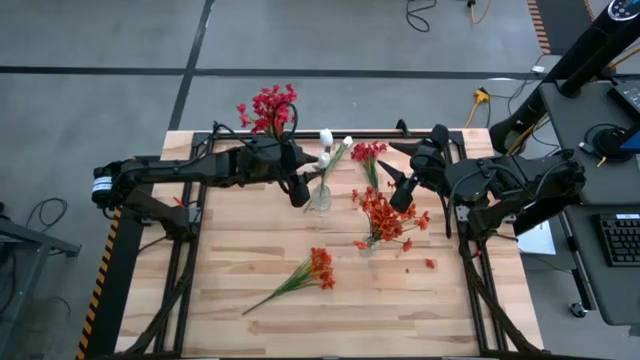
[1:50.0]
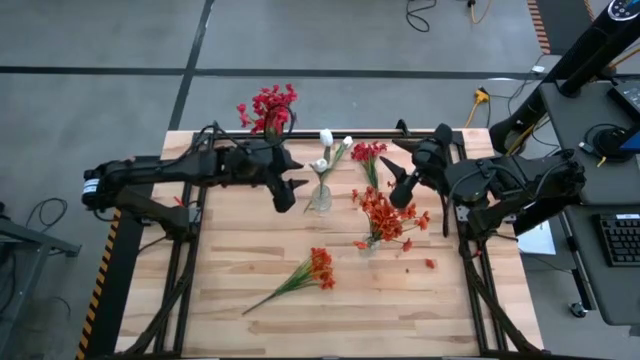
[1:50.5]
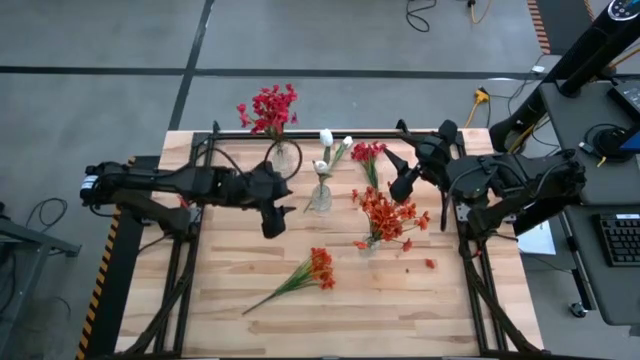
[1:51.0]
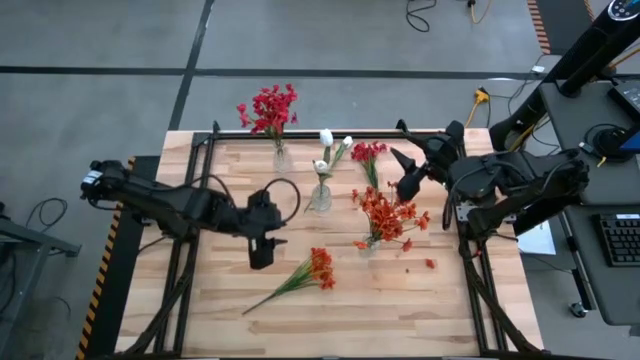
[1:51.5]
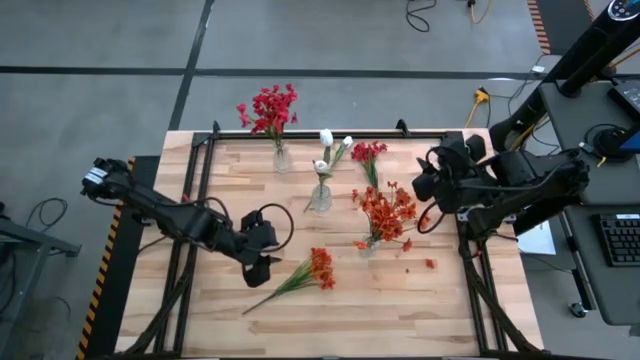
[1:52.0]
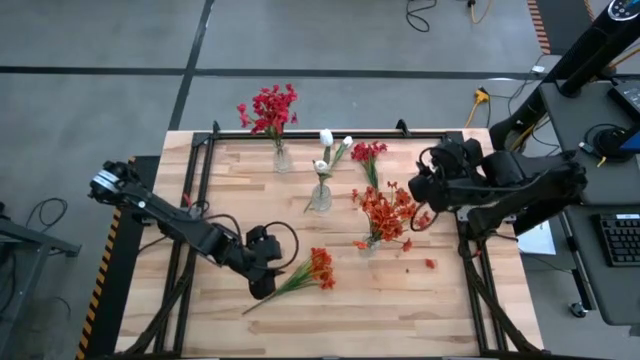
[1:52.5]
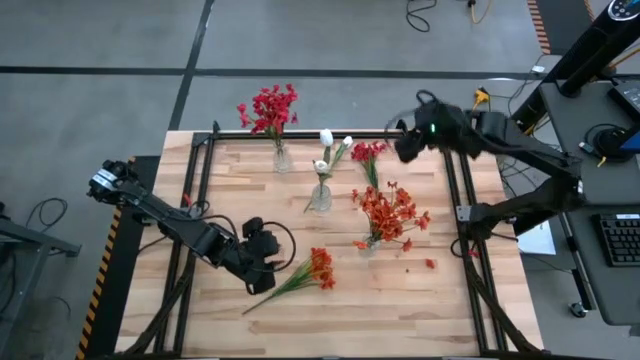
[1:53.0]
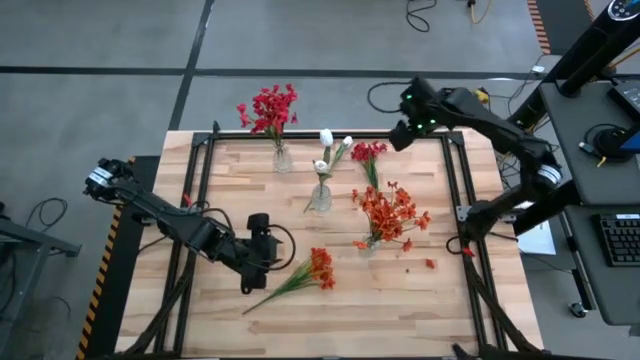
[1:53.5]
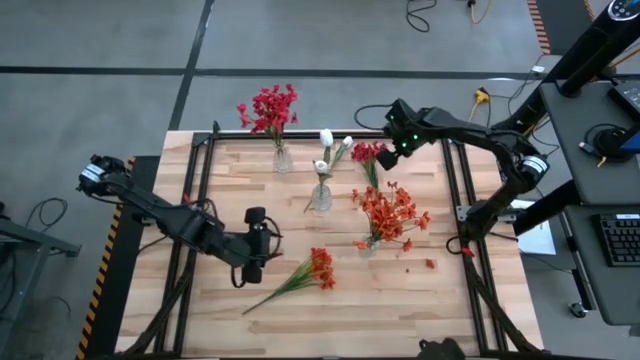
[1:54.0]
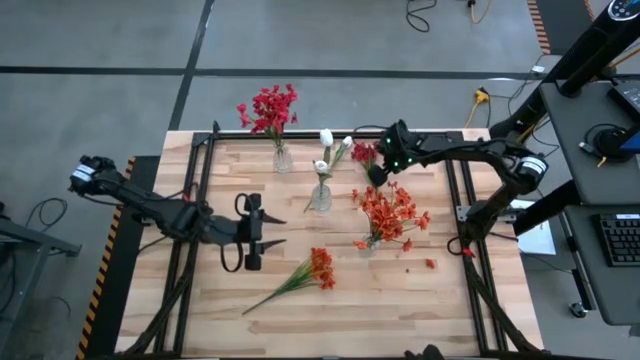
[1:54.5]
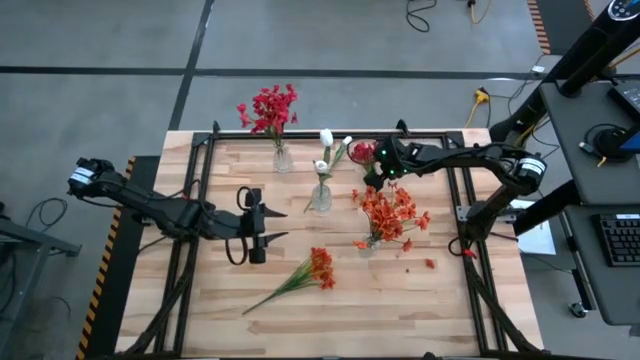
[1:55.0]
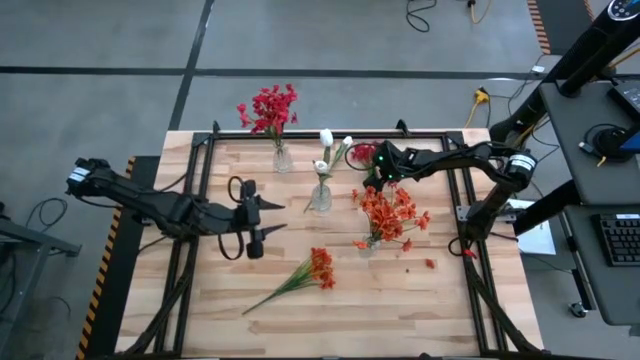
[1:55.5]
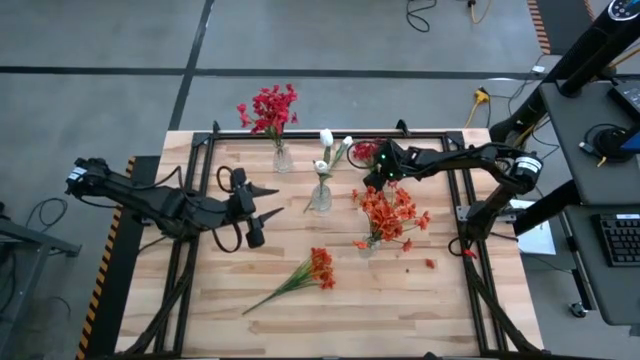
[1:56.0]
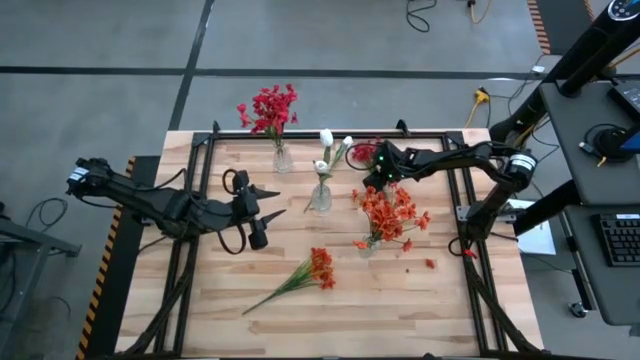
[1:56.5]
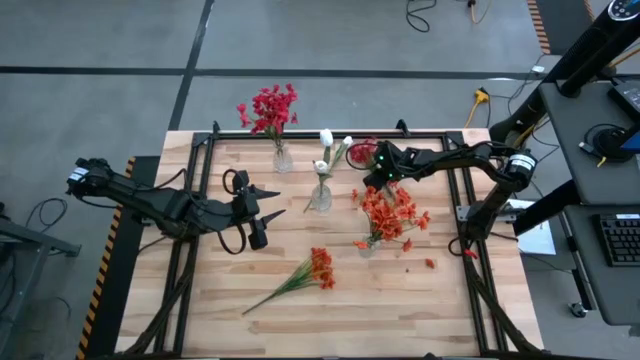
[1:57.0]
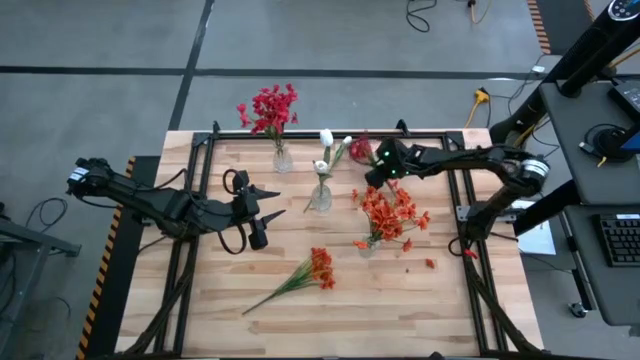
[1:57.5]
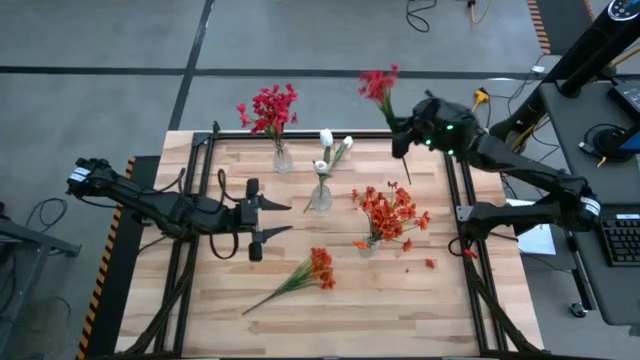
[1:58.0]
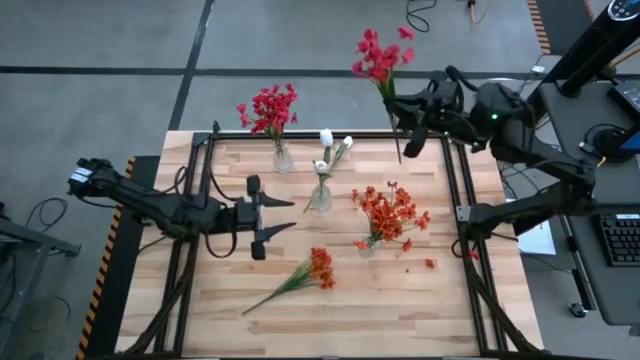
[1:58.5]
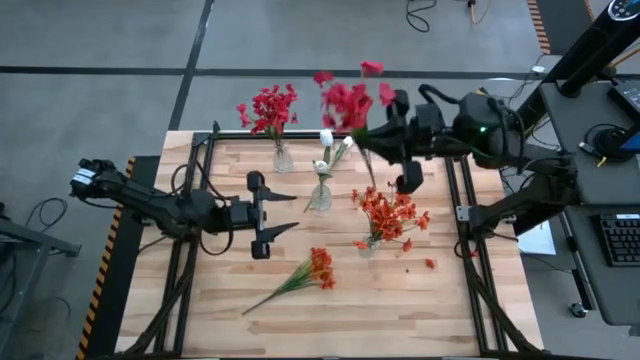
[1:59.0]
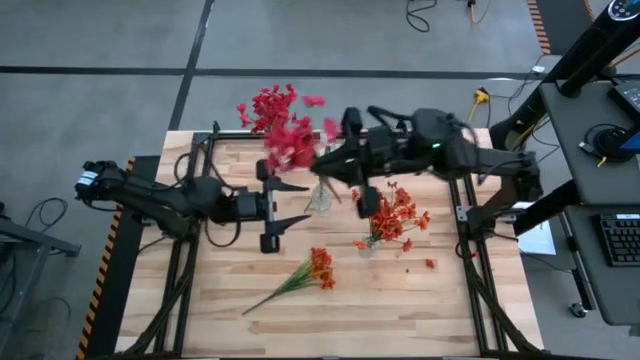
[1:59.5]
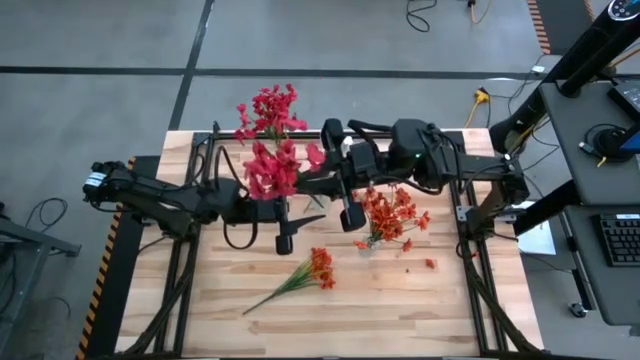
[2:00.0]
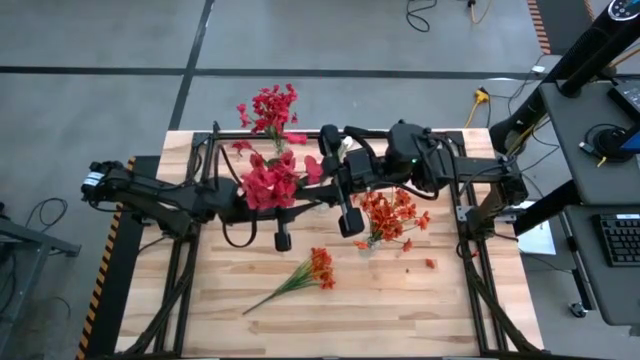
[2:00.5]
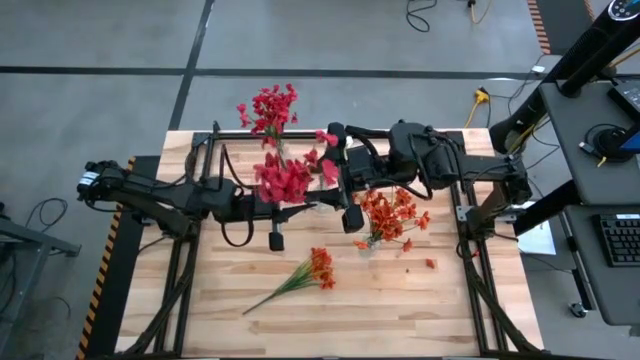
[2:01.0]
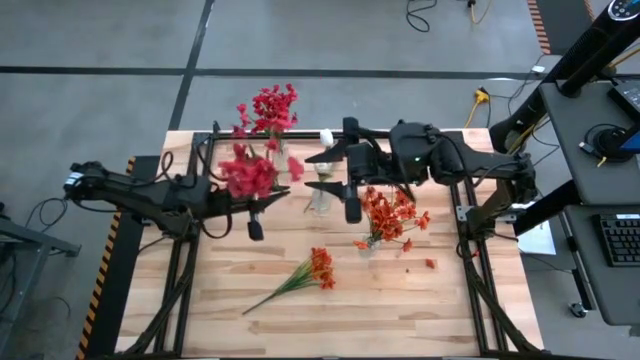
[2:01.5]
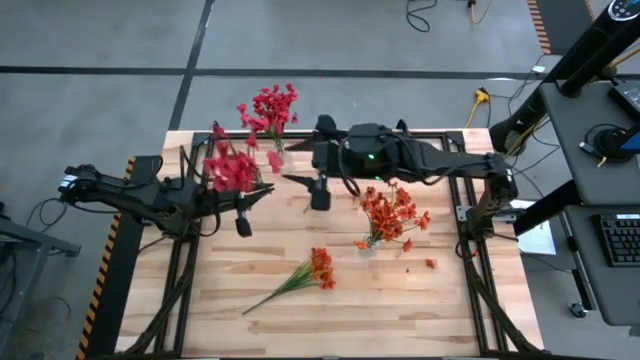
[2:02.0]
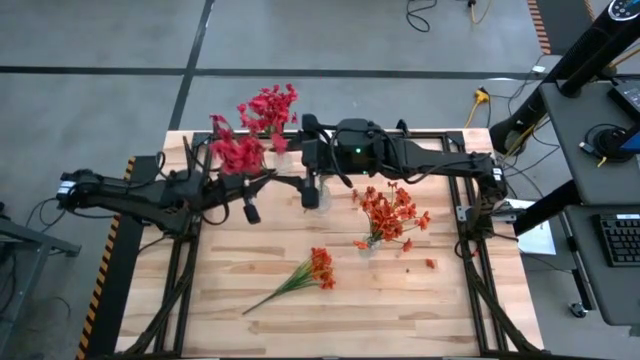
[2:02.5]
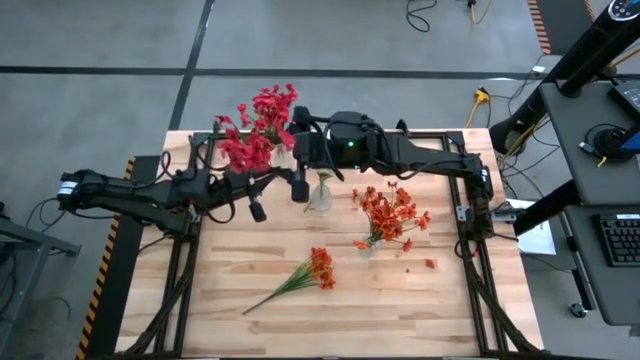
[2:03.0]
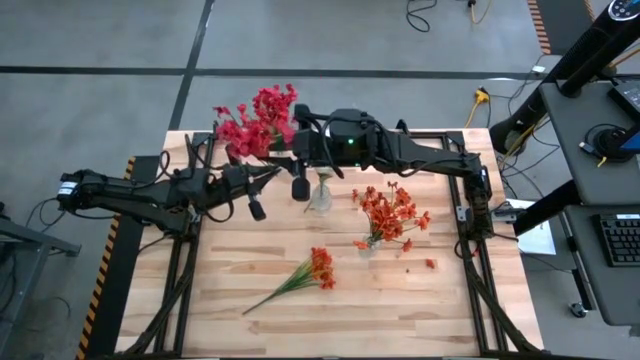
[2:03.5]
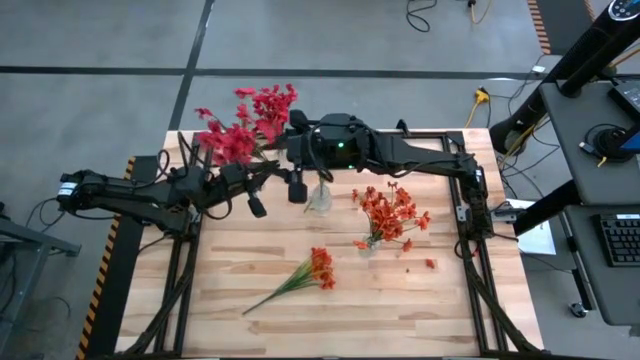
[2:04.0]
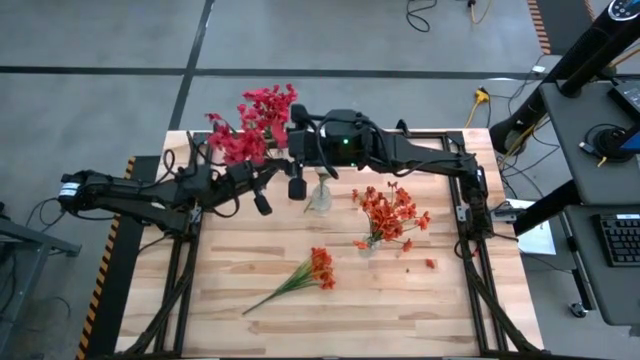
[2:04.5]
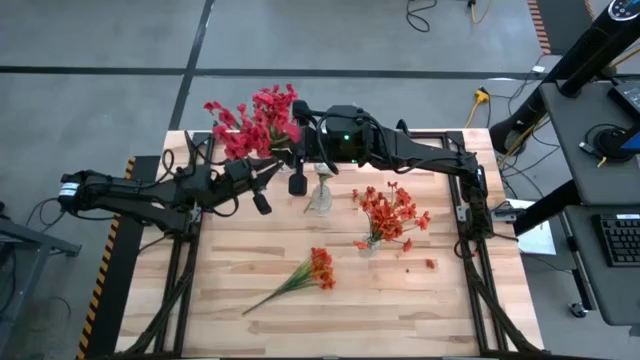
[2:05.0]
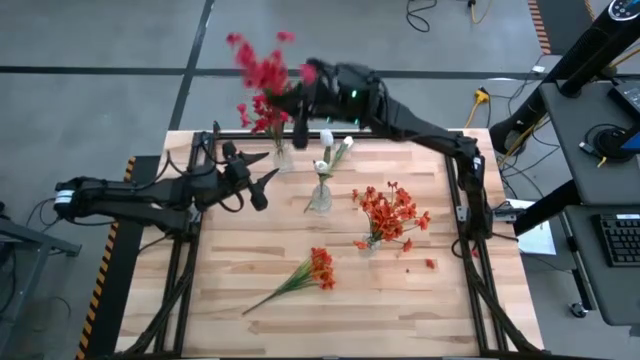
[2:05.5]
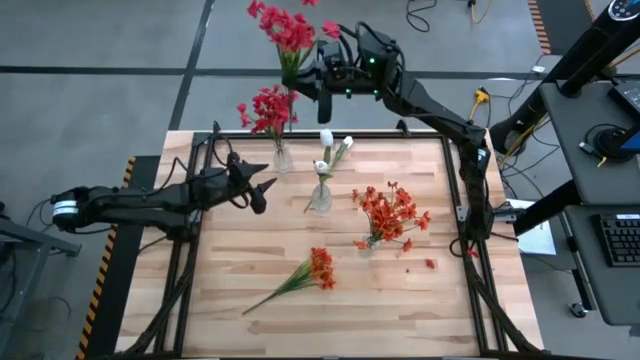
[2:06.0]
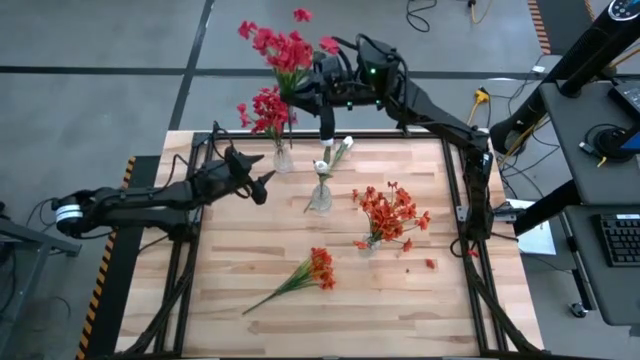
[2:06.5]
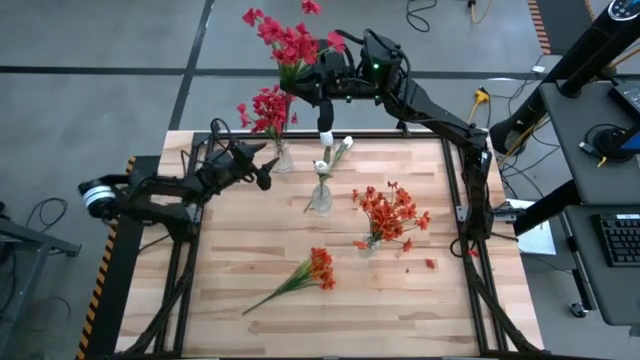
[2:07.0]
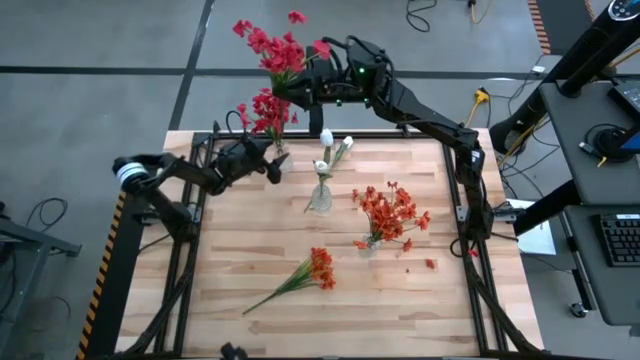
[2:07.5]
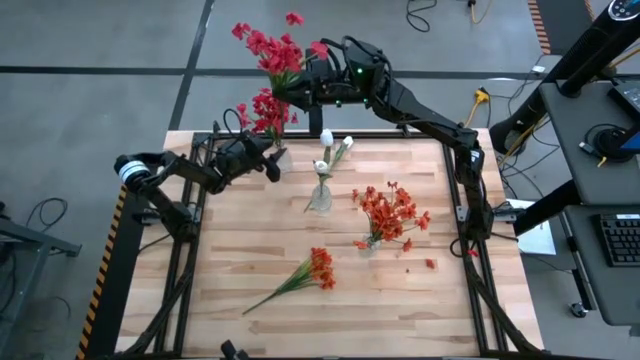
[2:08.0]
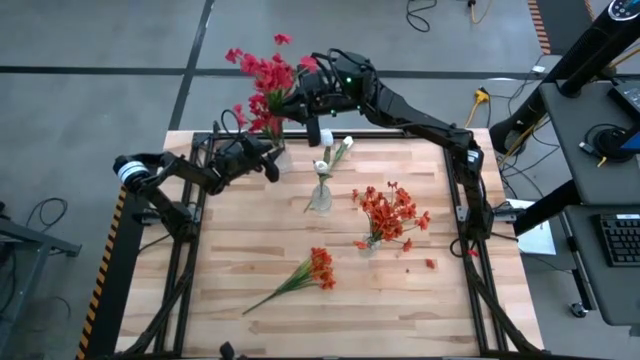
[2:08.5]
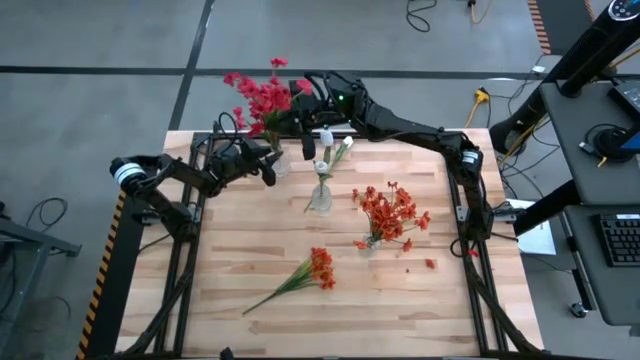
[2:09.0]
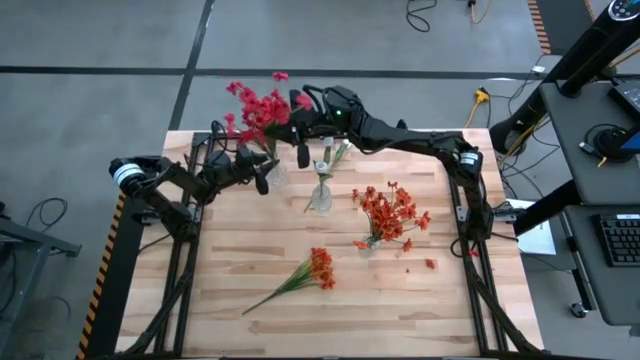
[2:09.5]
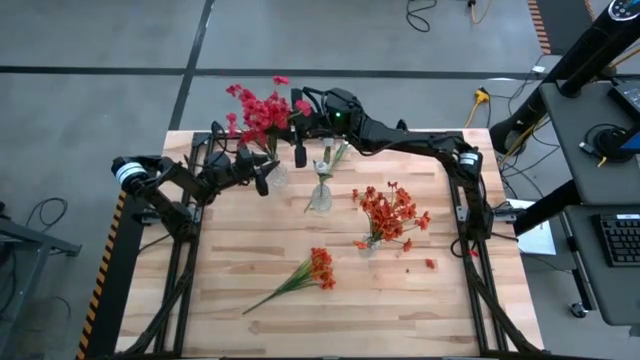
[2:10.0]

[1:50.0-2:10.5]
Task: Sort flowers into vase by color
Put the top center red sprig flower into the top left transparent glass vase

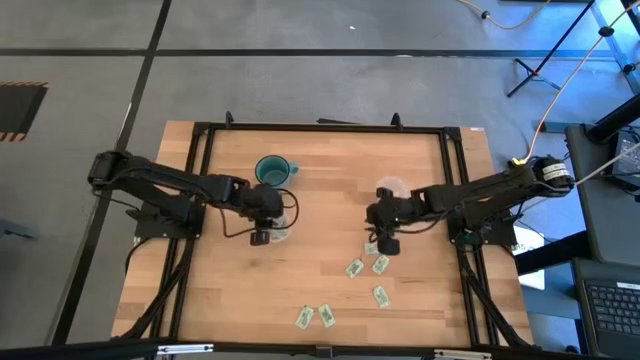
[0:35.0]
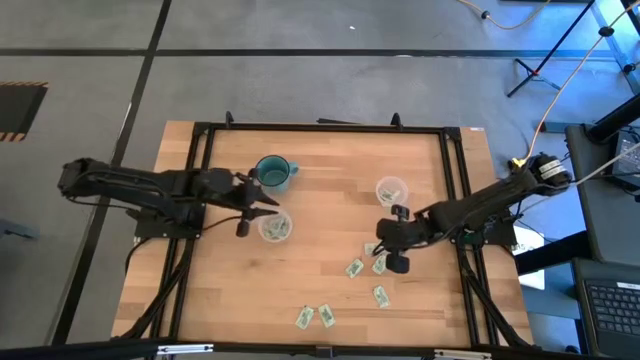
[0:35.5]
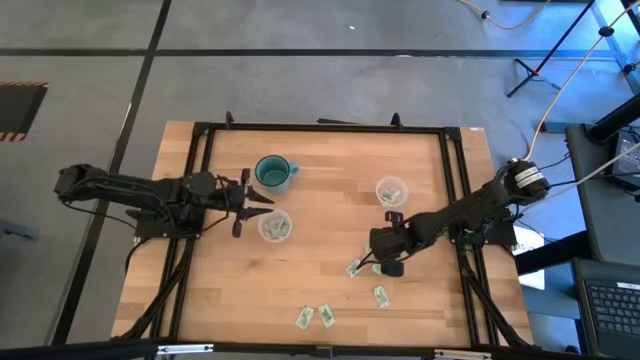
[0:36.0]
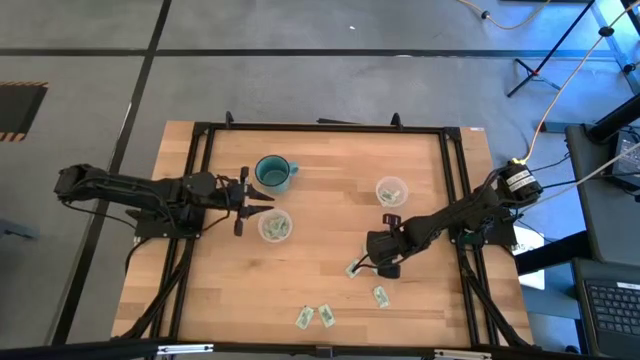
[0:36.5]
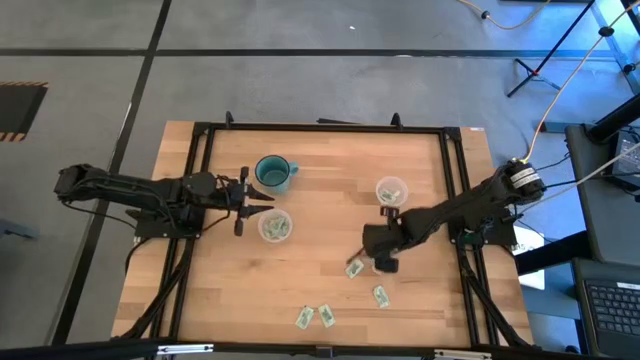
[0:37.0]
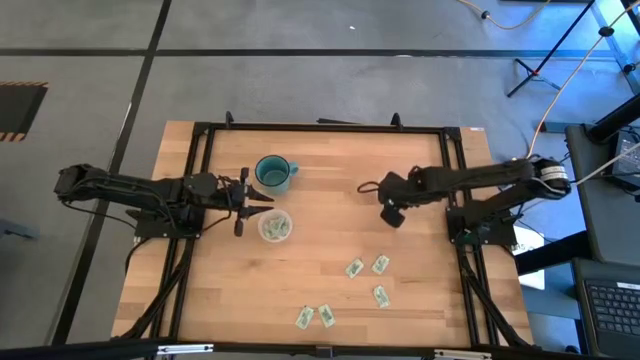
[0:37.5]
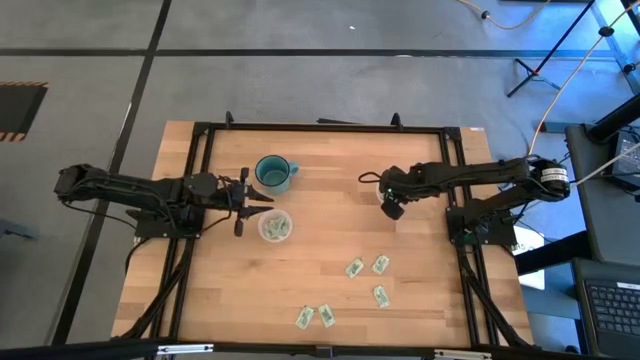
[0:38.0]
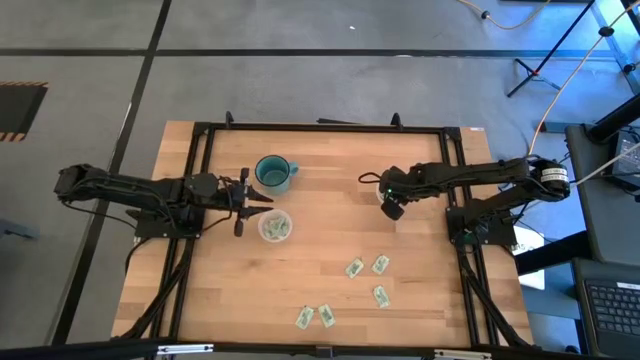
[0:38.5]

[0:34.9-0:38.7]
Task: Pick and place Stevia / Truvia into bins
Put the white stevia packet into the right transparent container
